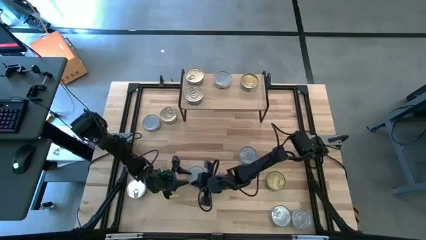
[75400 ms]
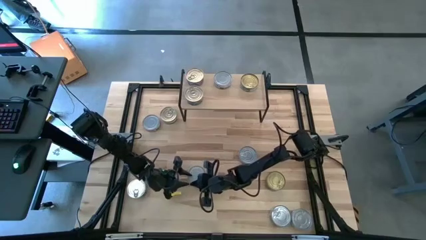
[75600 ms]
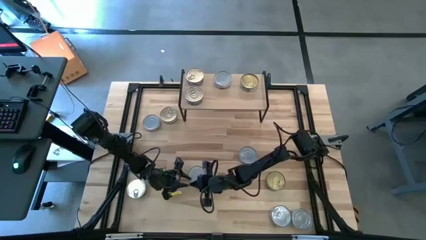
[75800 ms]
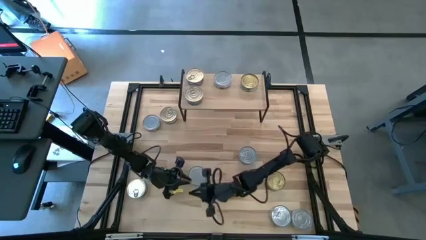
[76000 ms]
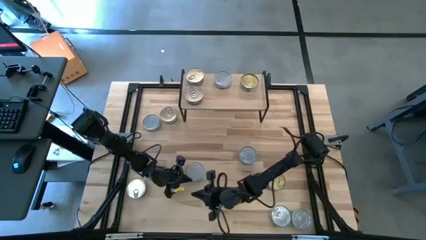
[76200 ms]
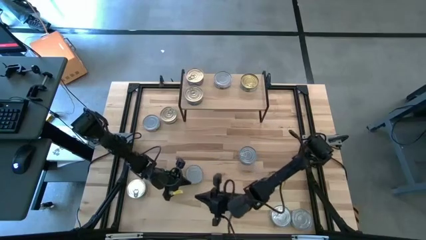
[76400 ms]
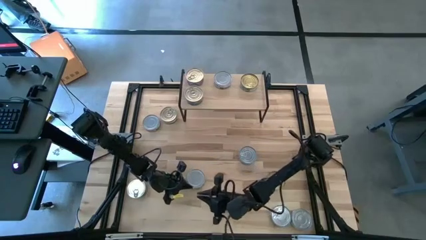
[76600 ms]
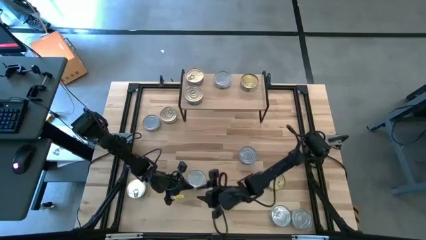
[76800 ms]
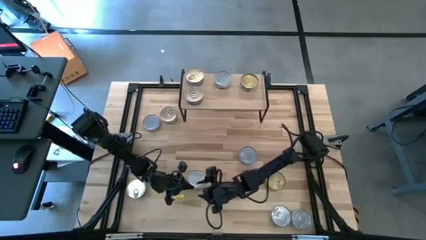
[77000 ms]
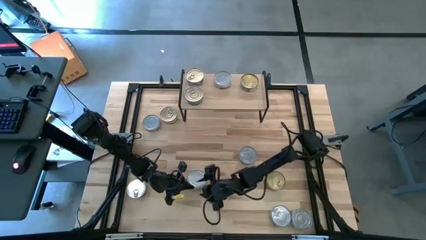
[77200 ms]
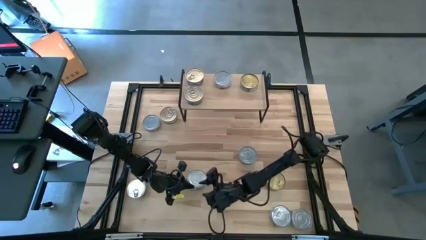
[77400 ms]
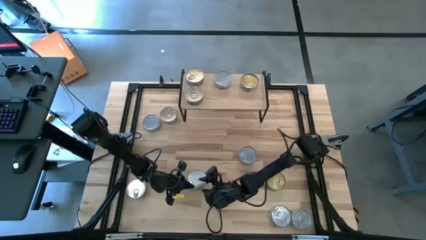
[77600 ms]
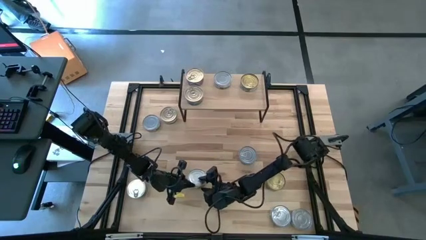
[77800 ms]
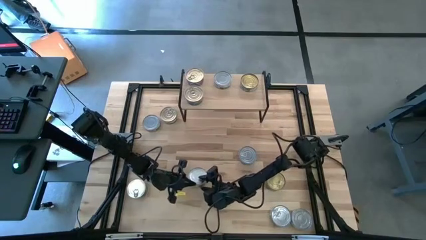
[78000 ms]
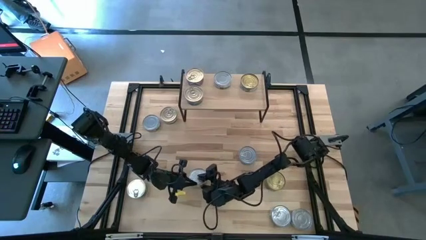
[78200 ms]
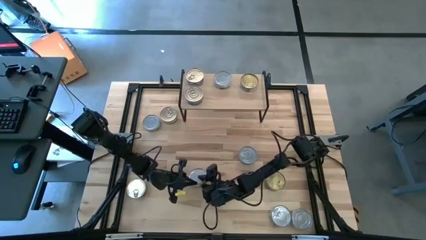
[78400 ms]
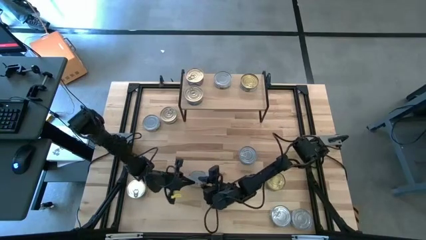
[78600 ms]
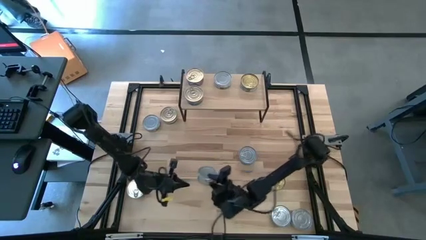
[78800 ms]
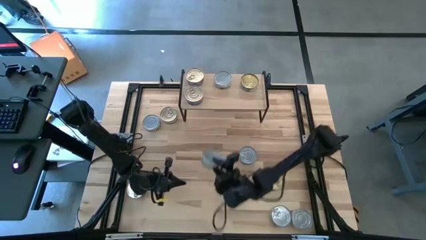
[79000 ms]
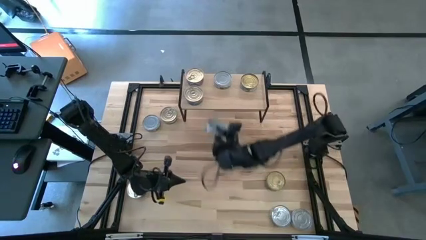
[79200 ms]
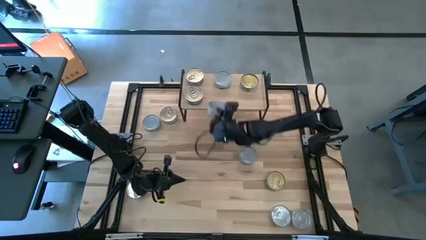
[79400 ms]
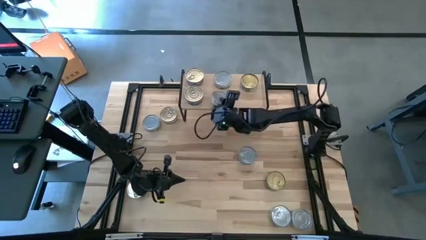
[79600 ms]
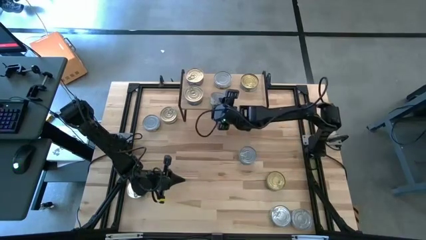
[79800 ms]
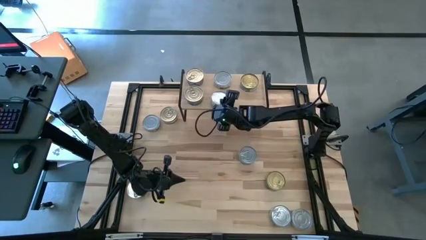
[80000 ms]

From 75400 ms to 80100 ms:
Task: Stack canned seafood by type on shelf
Put the green tuna can on the shelf

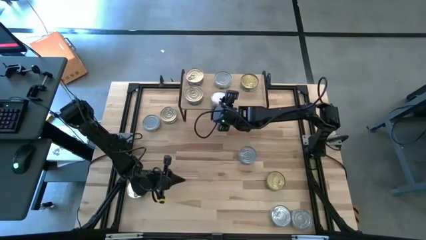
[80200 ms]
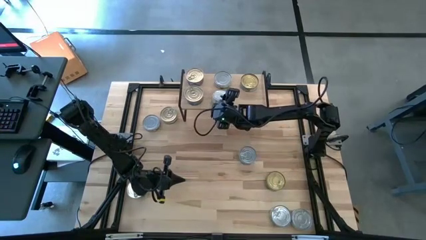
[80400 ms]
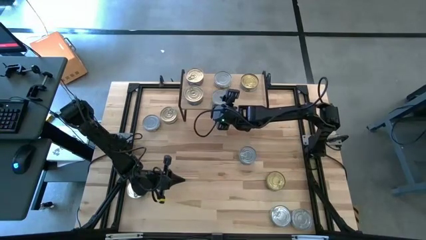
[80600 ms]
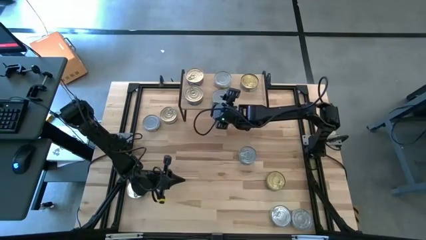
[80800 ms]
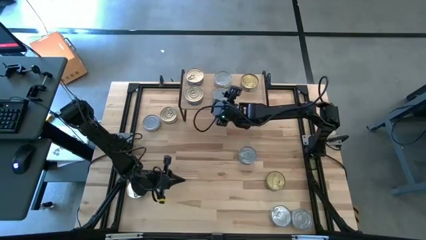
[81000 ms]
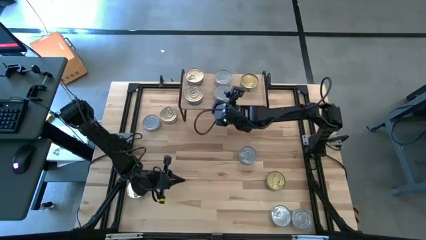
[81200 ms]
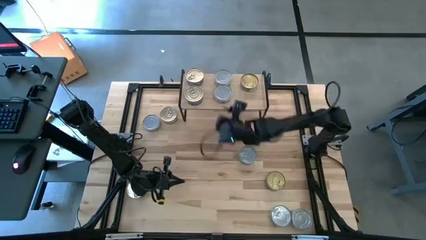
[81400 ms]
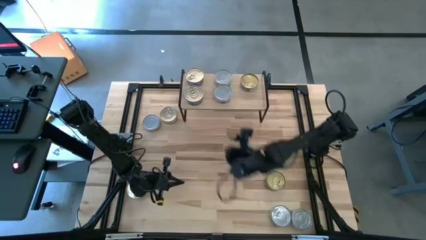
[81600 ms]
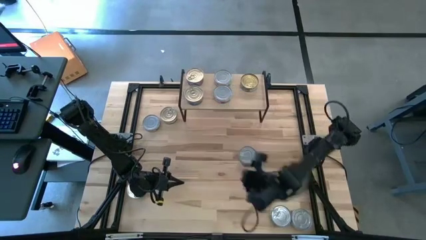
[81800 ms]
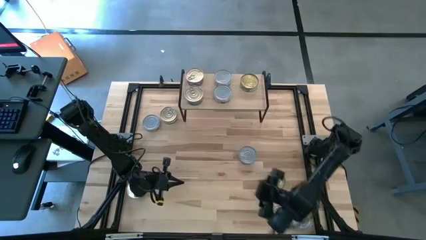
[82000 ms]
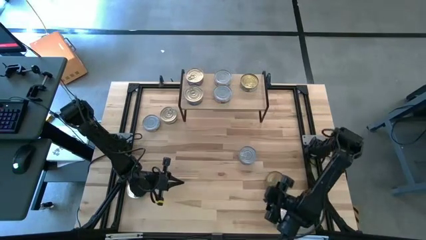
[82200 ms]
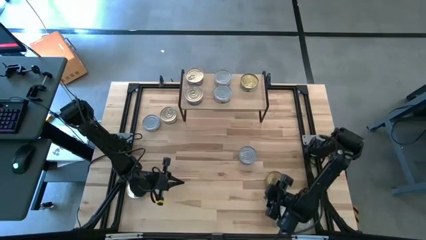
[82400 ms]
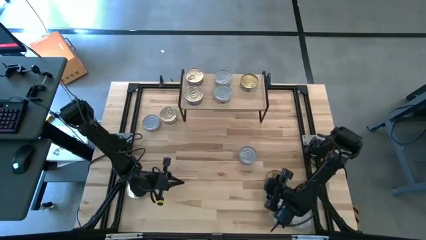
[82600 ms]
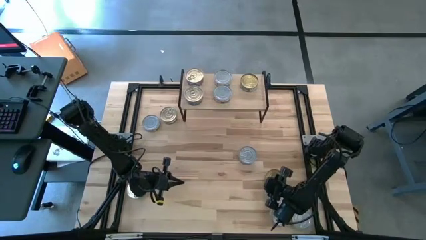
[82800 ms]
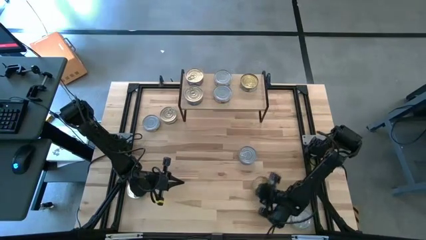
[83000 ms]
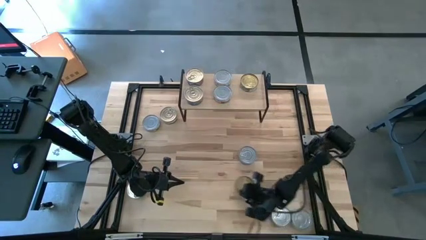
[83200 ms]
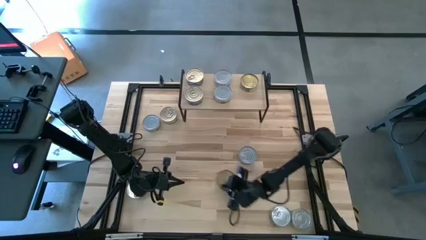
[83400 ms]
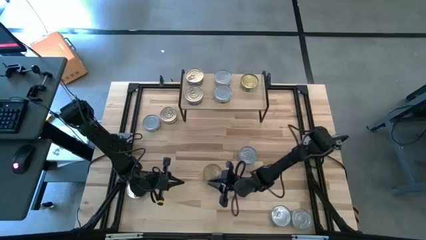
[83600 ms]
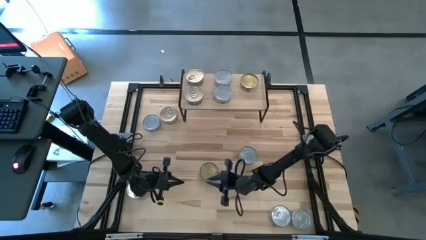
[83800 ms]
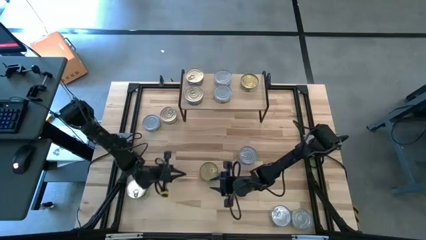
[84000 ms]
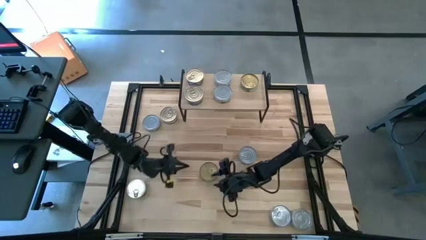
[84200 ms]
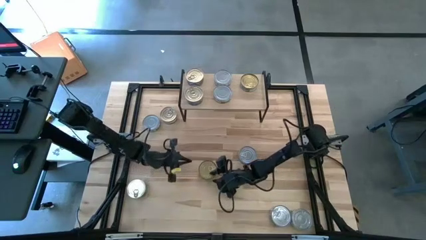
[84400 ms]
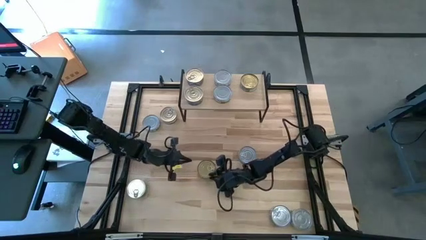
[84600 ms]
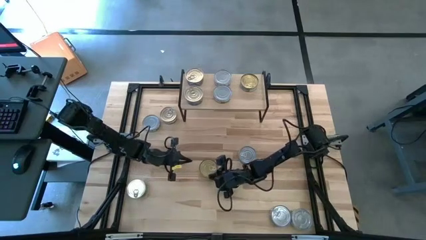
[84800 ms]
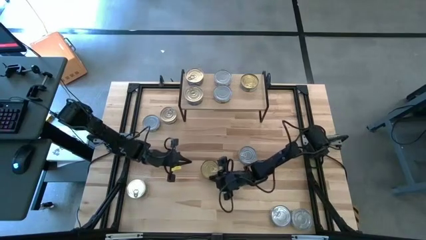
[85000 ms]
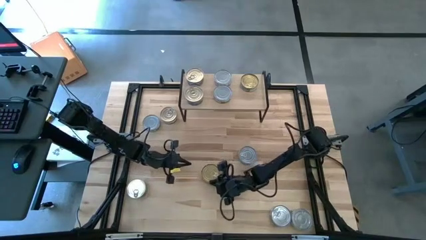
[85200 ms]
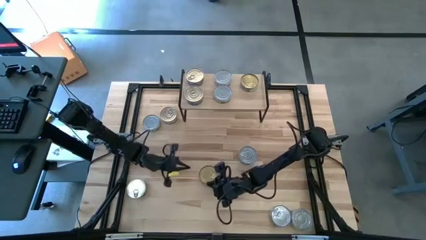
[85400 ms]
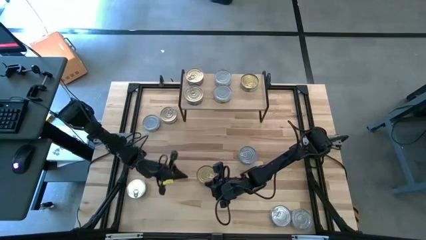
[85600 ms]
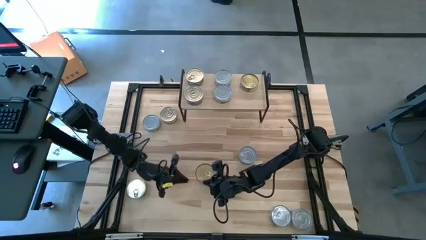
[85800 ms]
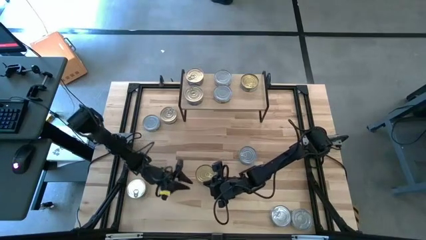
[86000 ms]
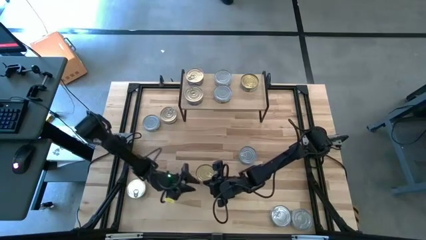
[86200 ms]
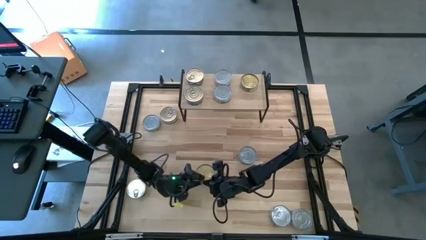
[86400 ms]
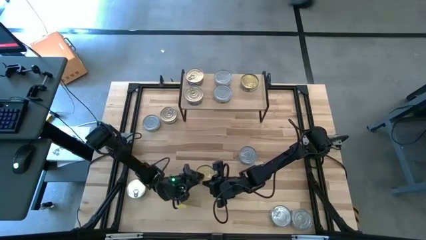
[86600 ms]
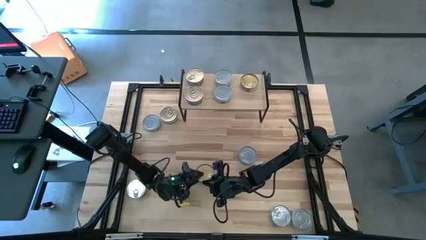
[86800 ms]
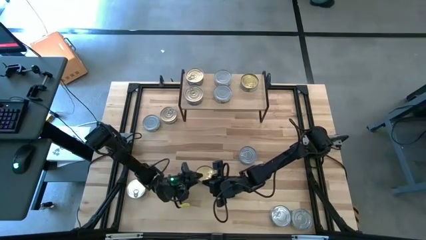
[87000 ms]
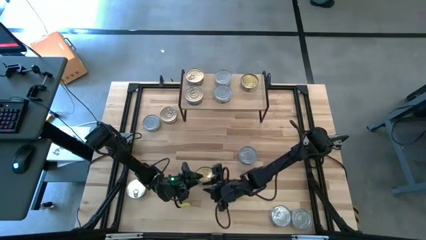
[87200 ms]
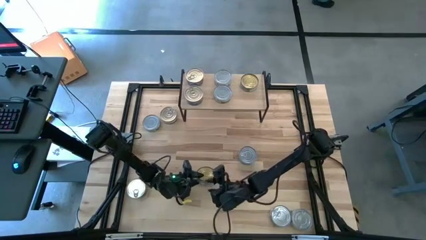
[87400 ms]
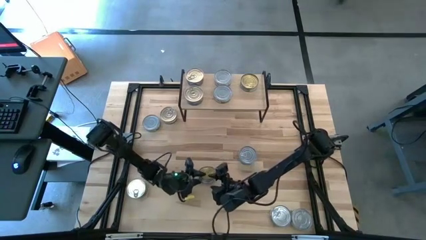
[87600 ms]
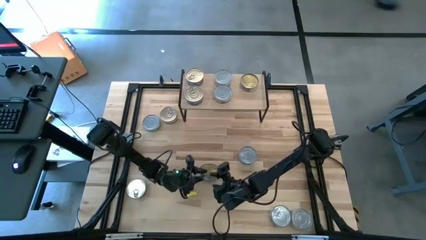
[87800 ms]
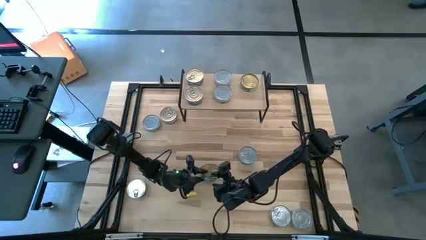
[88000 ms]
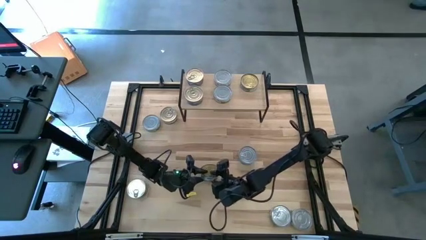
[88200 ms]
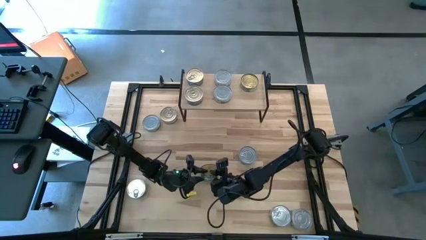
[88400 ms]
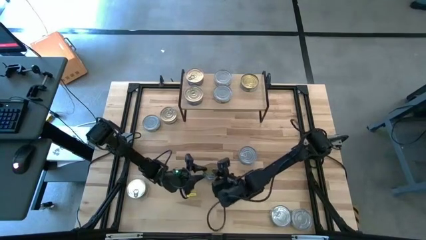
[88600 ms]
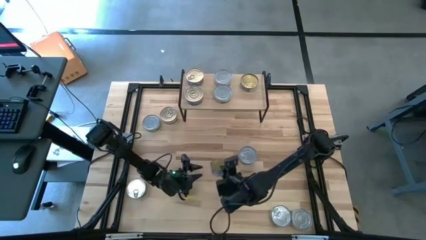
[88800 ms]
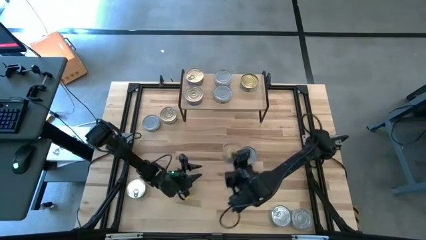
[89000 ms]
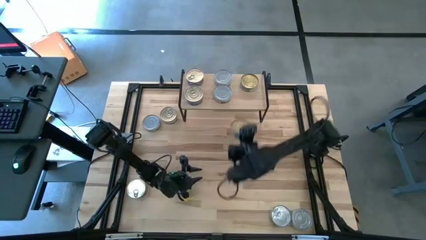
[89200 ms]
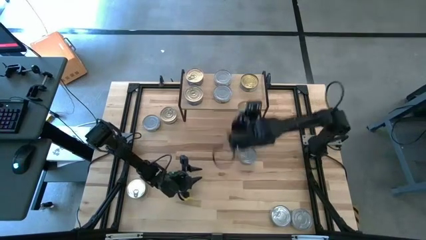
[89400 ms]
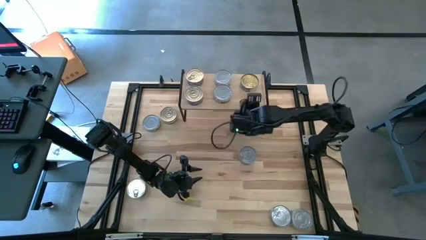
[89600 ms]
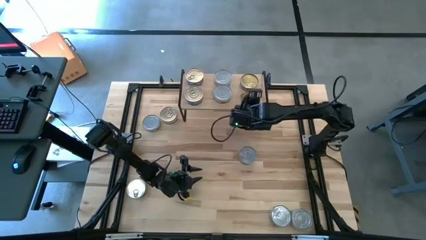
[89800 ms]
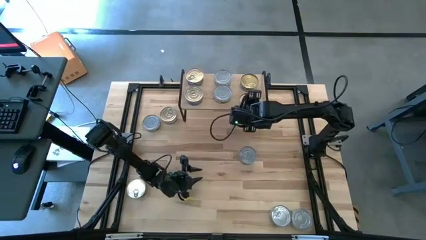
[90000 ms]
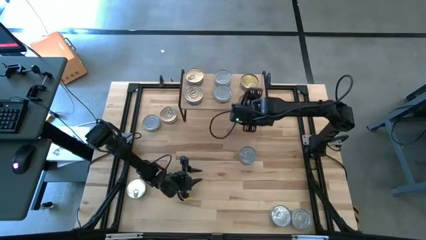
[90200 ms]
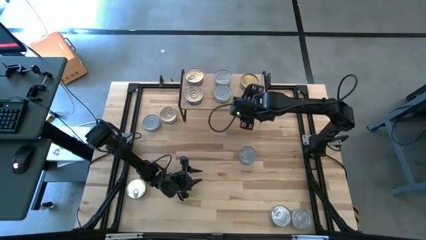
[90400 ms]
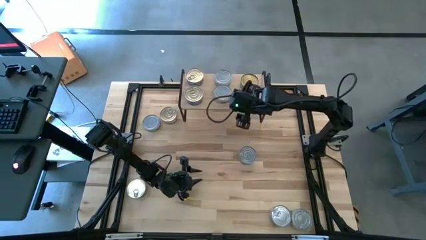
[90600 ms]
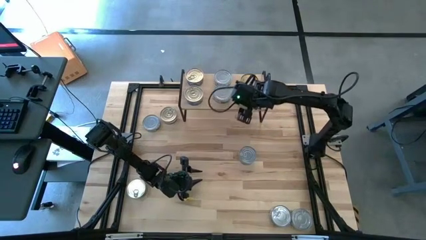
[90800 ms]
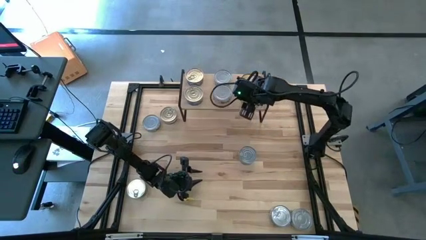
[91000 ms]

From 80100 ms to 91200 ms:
Put the green with blue patterned tuna can on the shelf
